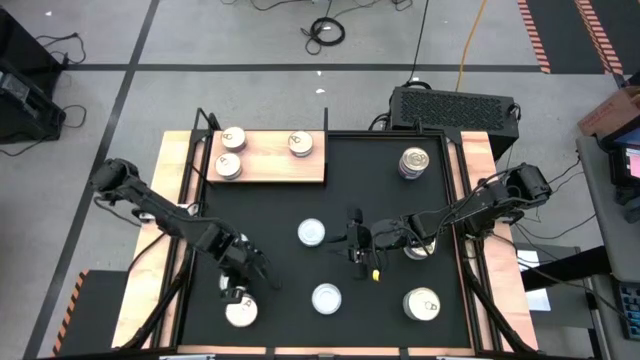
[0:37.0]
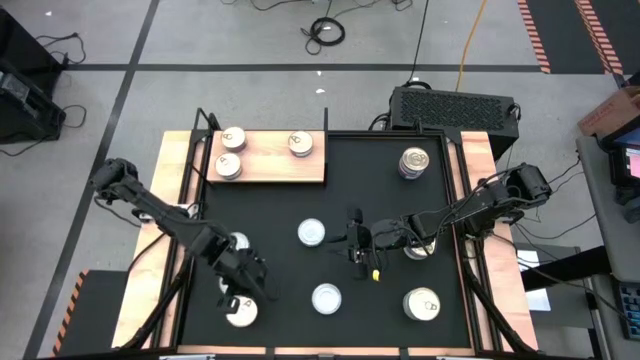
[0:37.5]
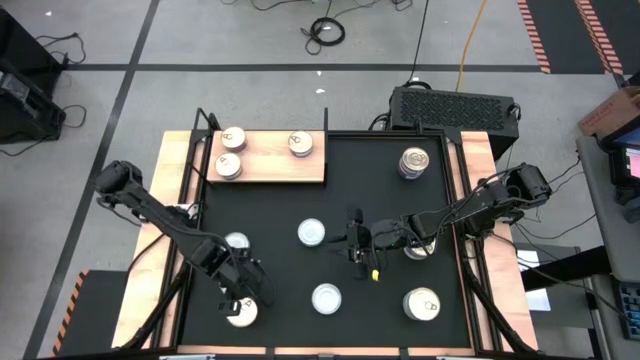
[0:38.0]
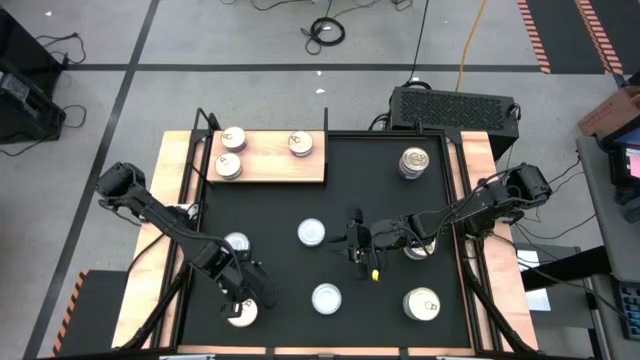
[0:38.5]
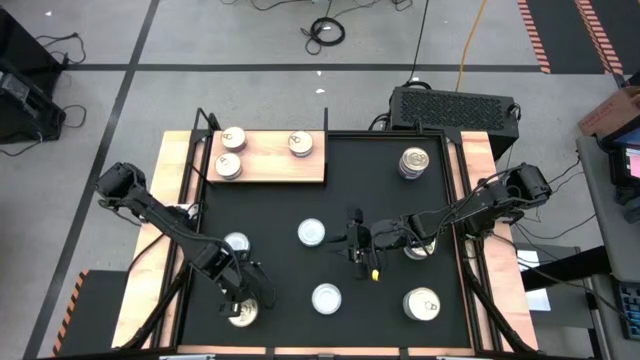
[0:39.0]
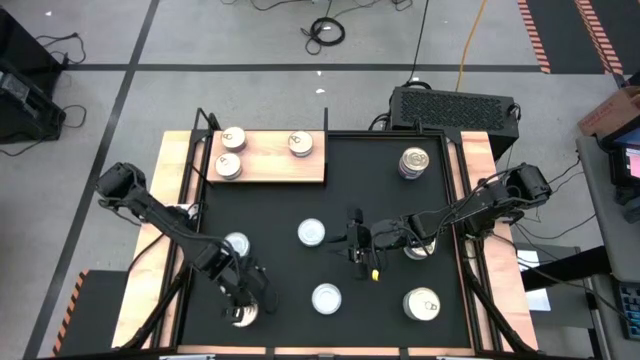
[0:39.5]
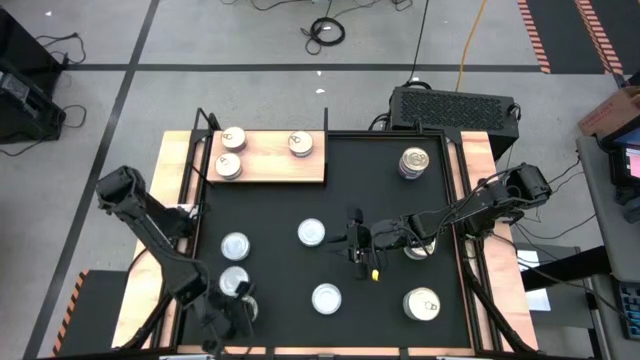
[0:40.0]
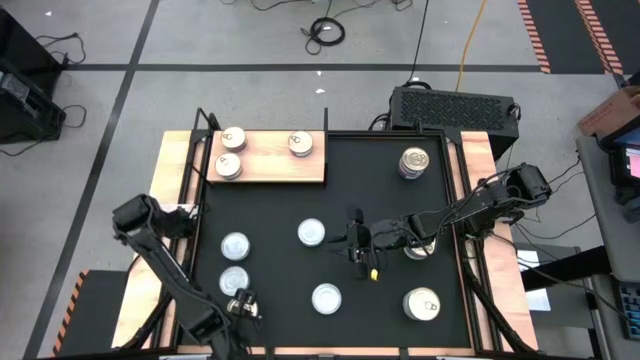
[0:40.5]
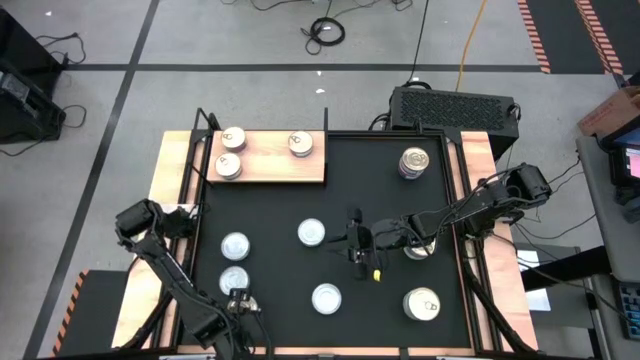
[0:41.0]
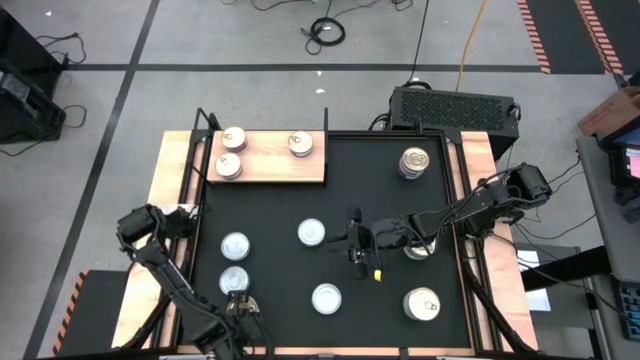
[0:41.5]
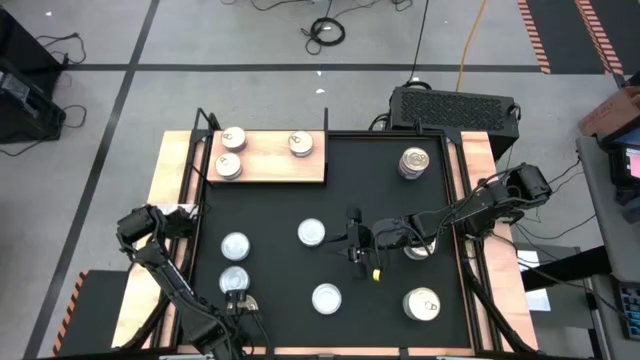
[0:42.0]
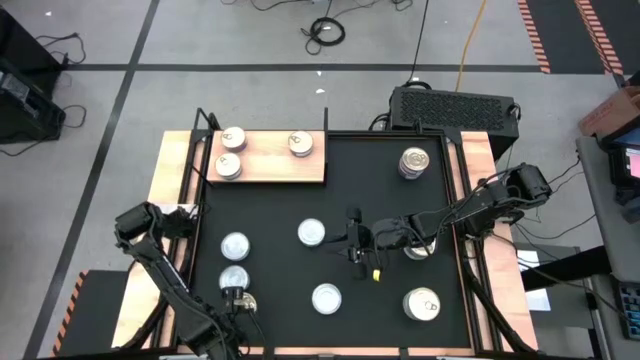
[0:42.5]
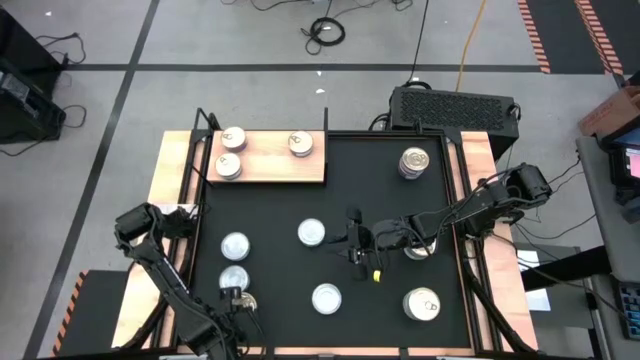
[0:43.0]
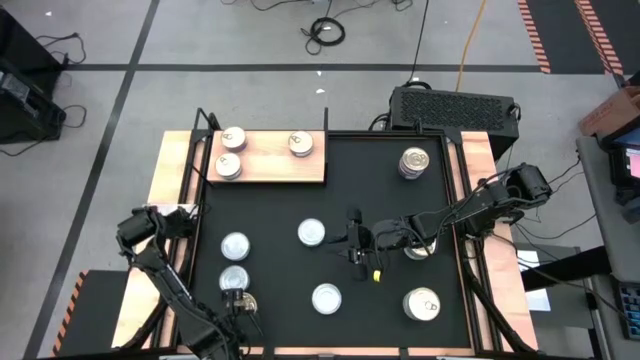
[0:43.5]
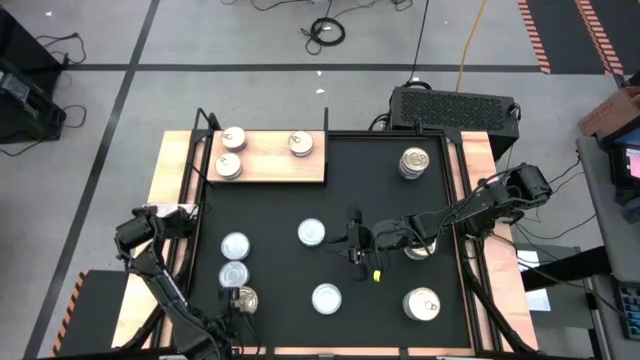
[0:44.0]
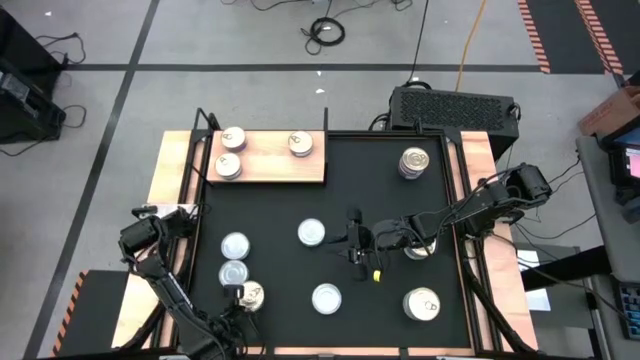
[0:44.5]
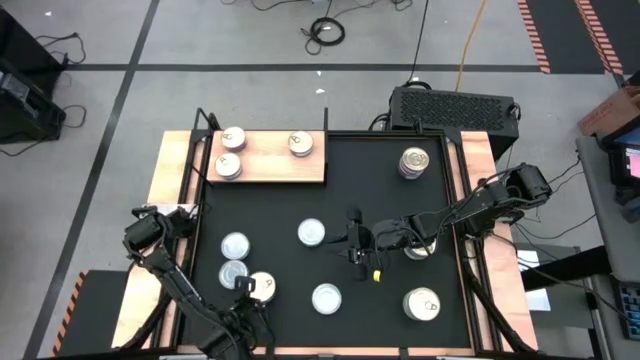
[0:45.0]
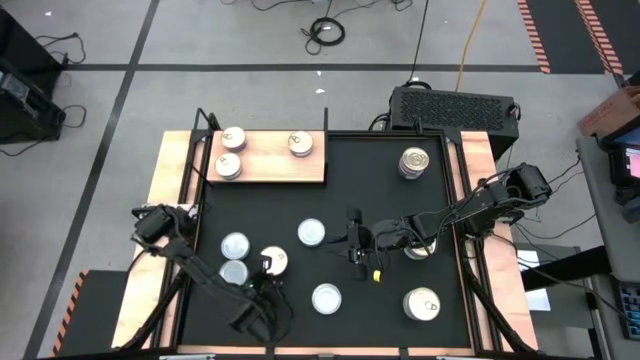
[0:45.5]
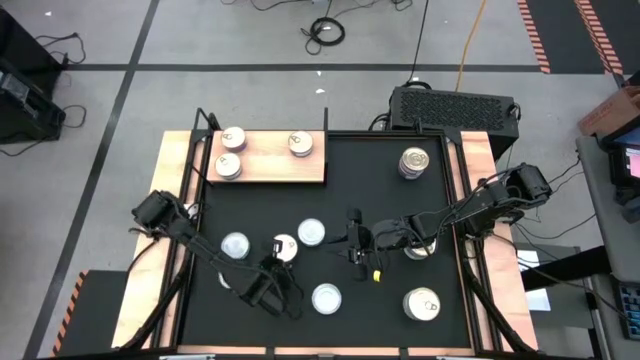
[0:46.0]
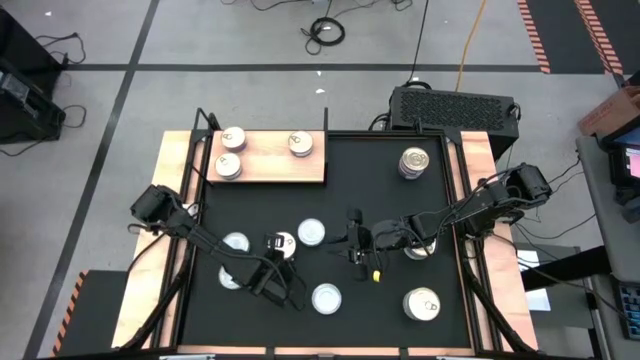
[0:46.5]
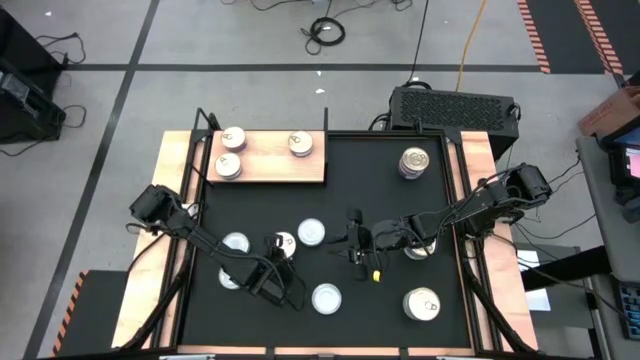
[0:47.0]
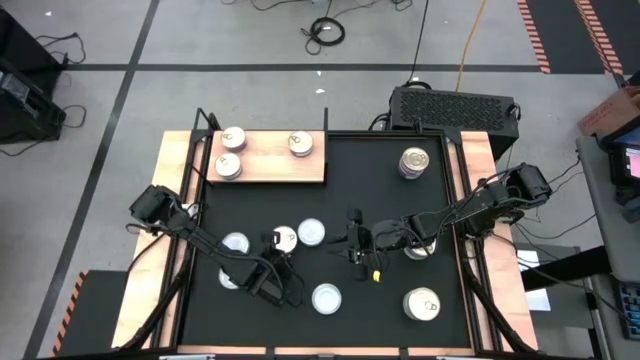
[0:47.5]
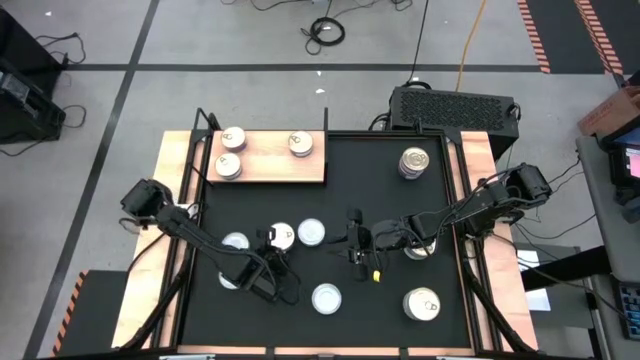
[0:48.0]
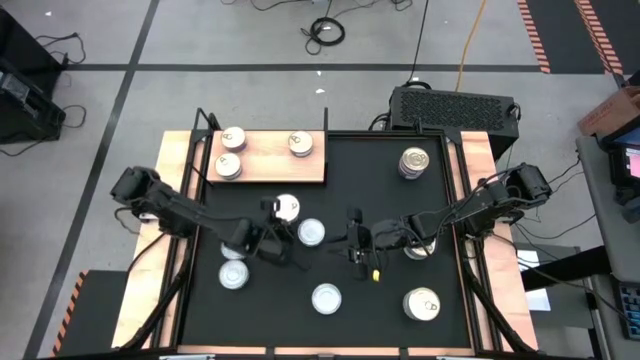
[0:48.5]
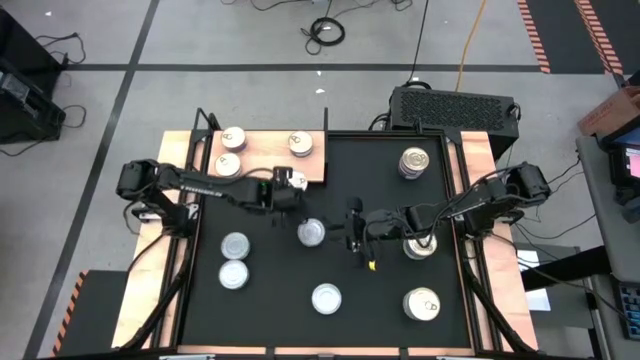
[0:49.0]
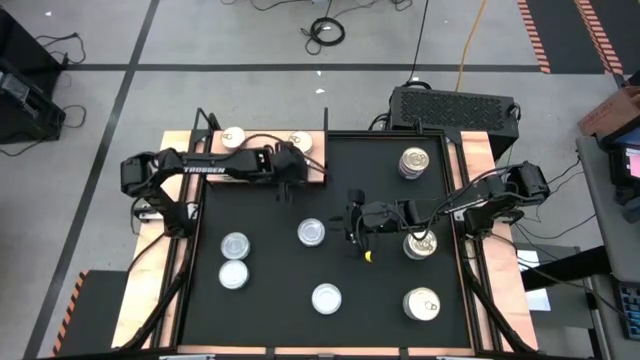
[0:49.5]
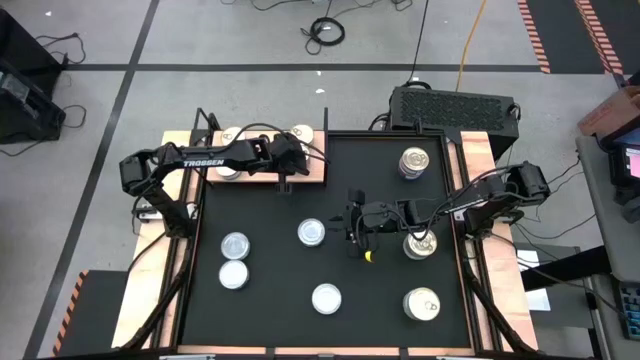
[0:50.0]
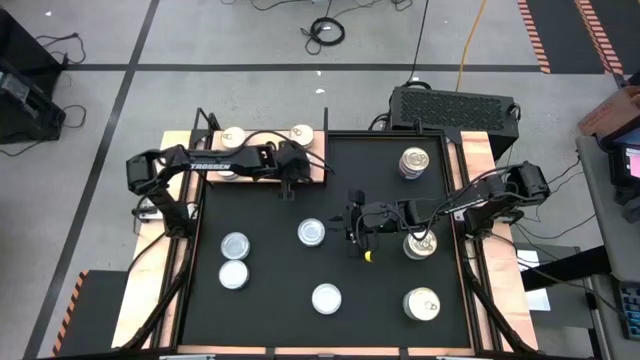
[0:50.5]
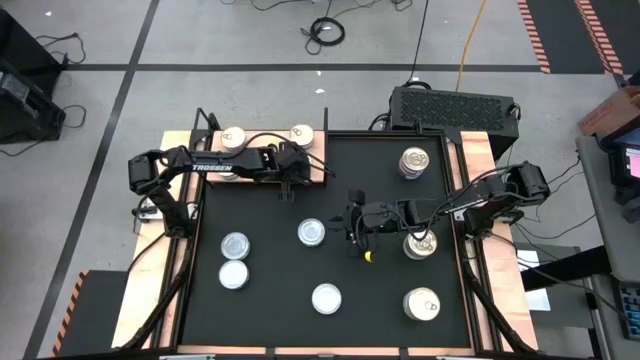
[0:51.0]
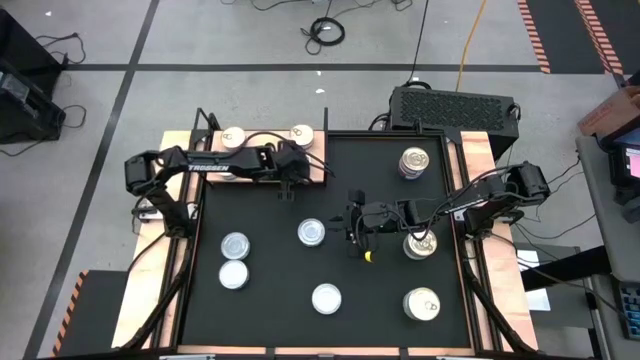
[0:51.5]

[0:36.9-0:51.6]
Task: Stack canned seafood by type on shelf
Put the blue-pink tuna can on the shelf

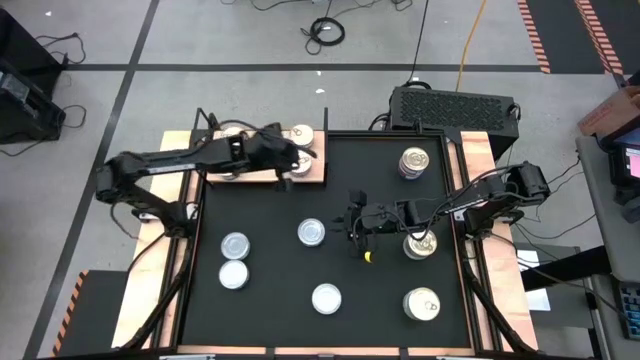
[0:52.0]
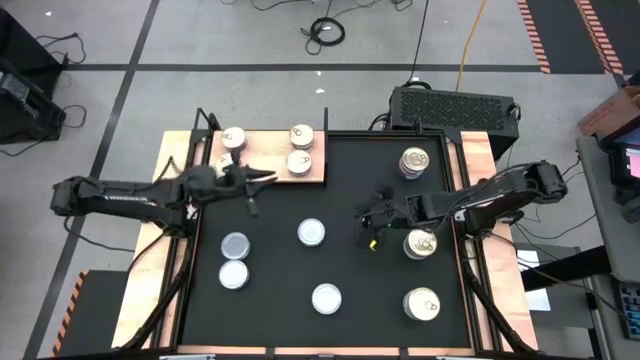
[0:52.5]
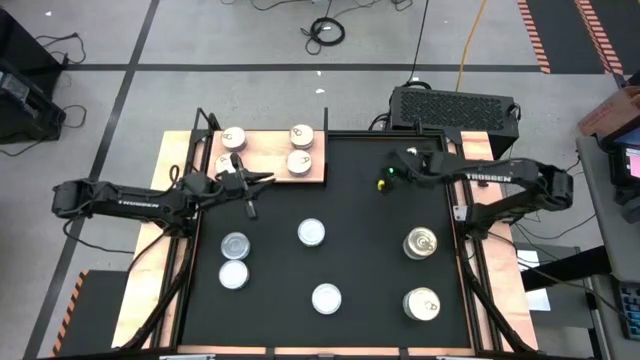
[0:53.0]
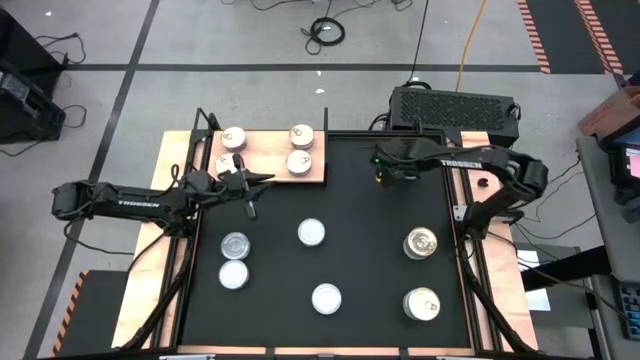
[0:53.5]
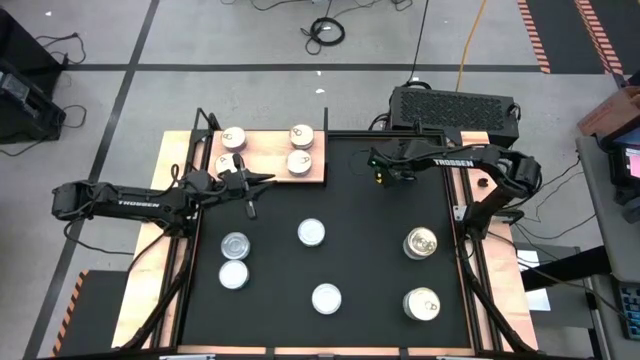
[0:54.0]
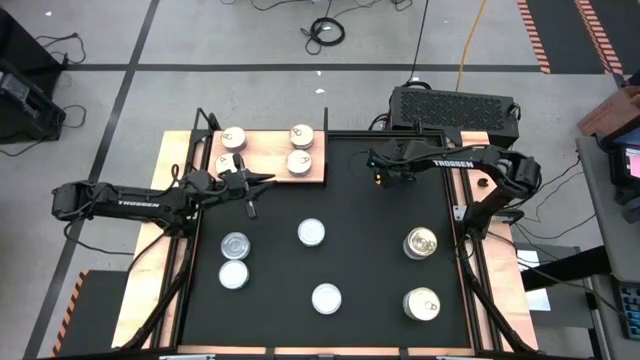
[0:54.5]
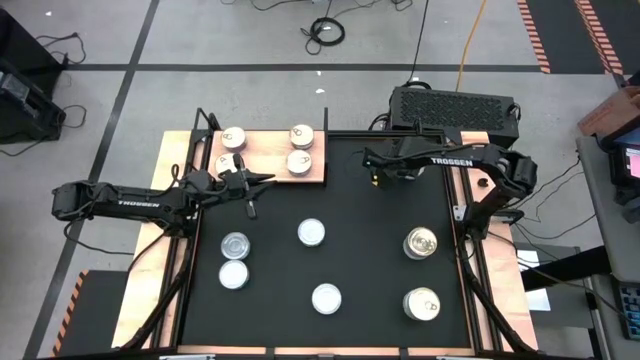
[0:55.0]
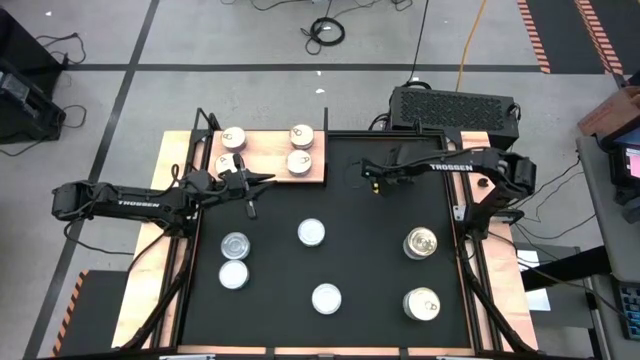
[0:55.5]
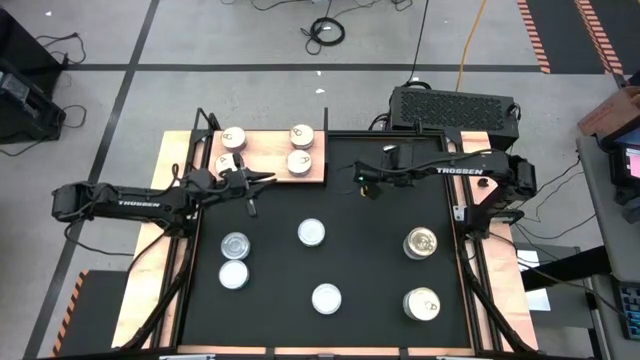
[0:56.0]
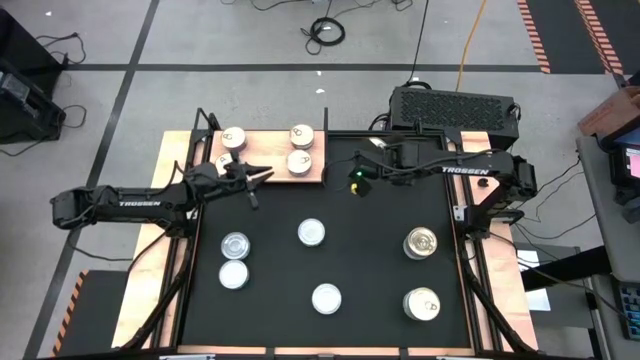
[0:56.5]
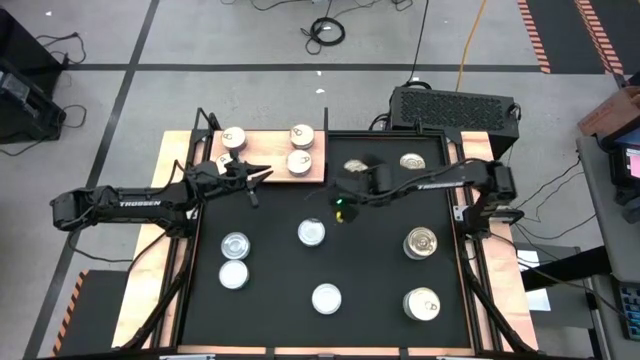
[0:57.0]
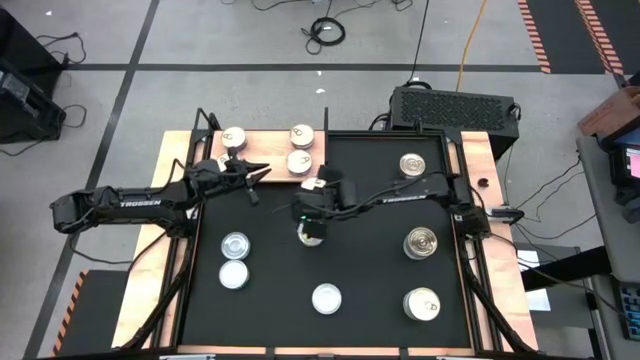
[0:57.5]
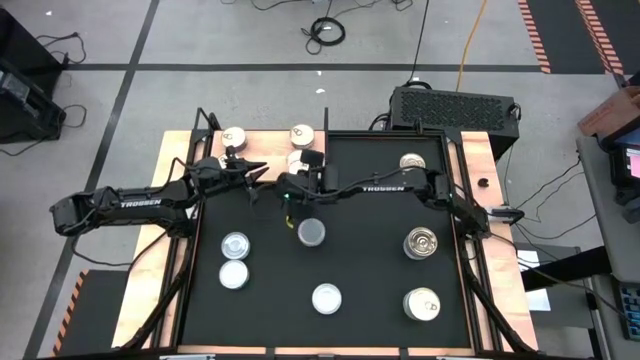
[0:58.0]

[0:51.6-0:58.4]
Put the blue-pink tuna can on the shelf

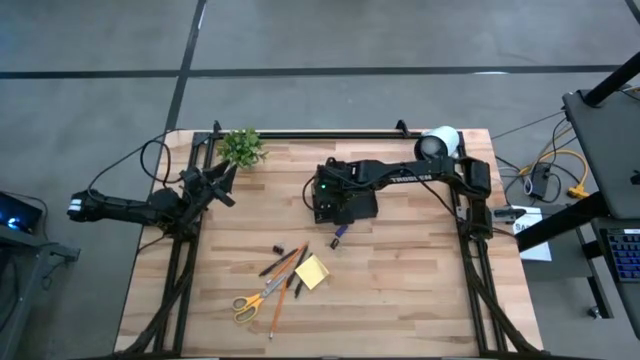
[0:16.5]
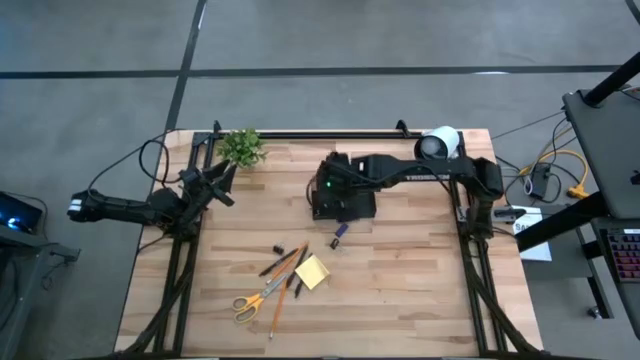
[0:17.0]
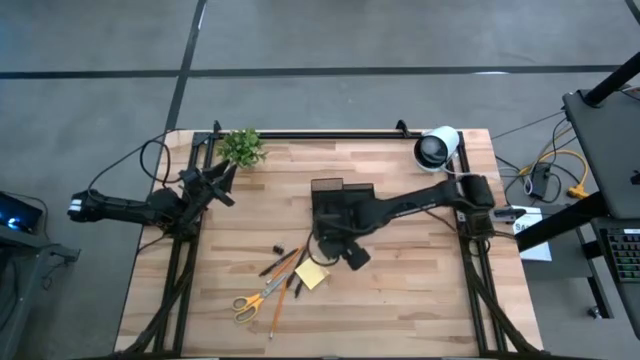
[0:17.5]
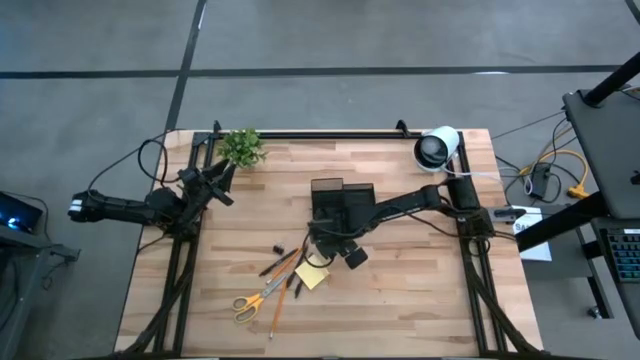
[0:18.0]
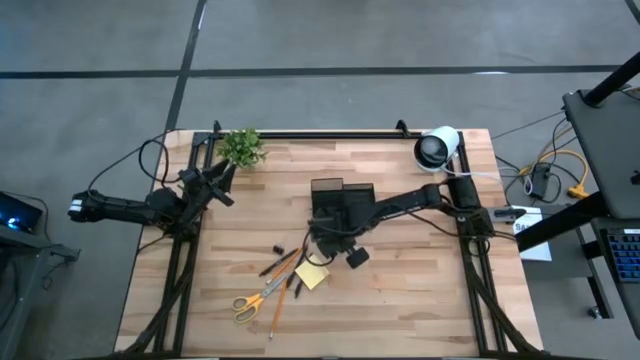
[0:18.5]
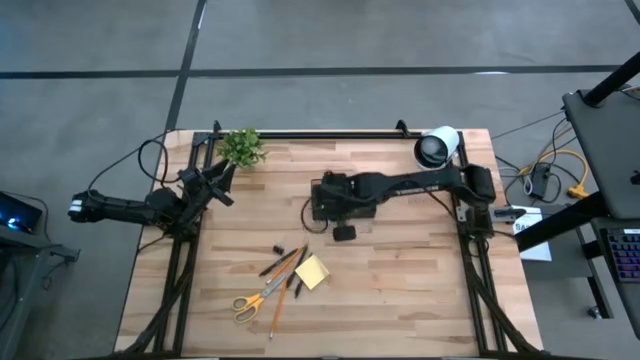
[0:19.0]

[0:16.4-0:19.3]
Task: Pick and place office supplies into organizer
Put the right black binder clip into the black desk organizer
